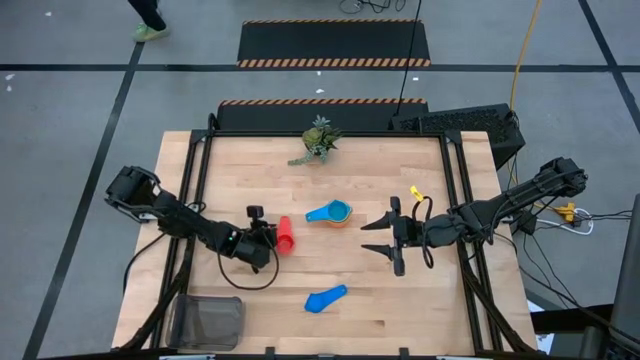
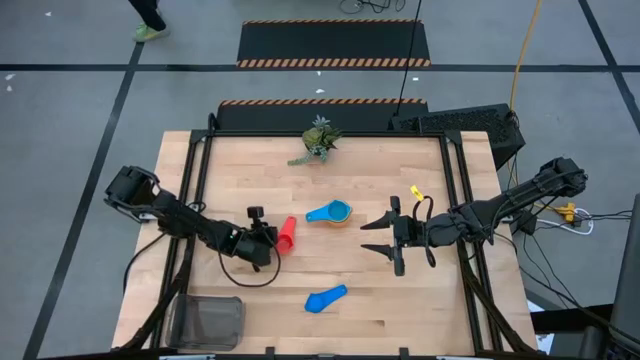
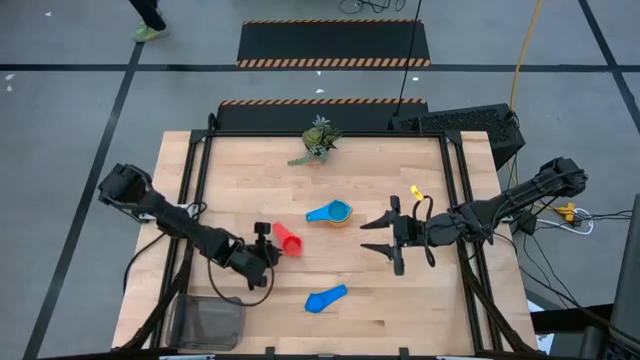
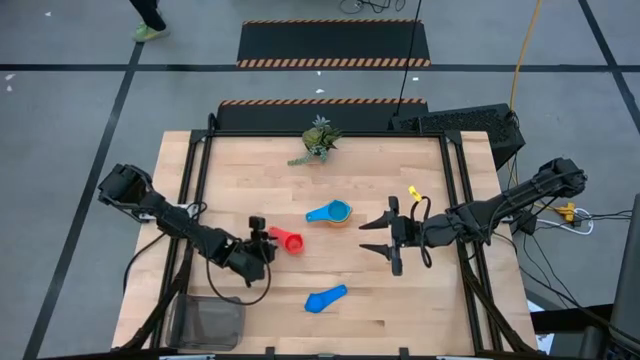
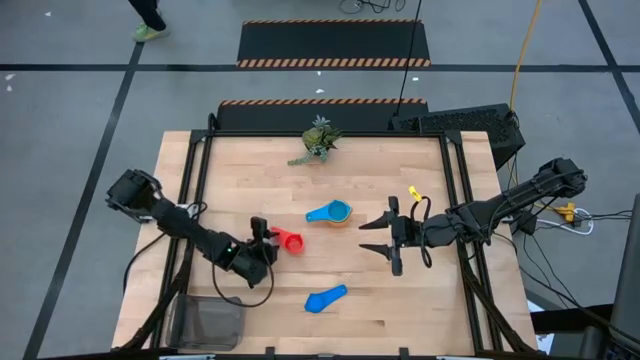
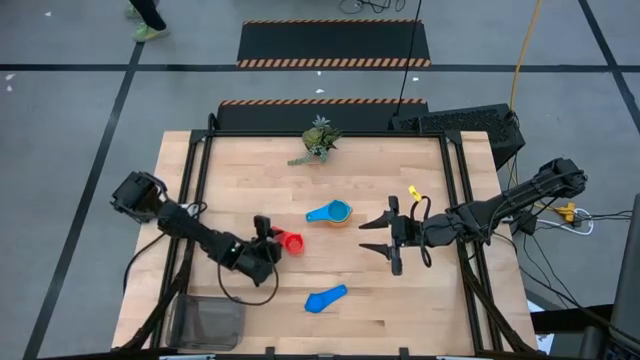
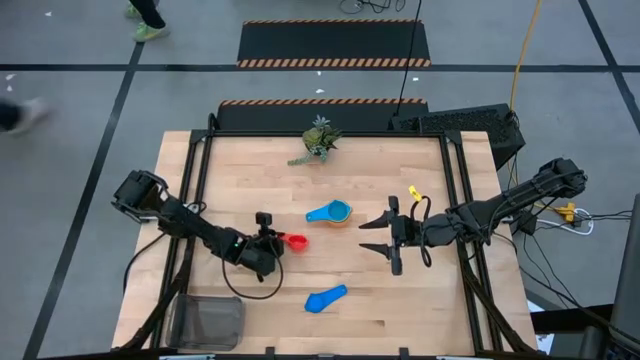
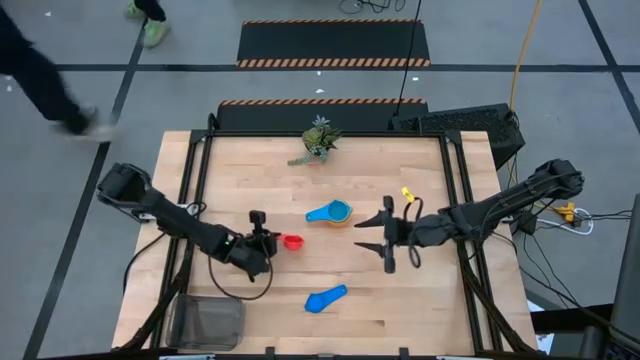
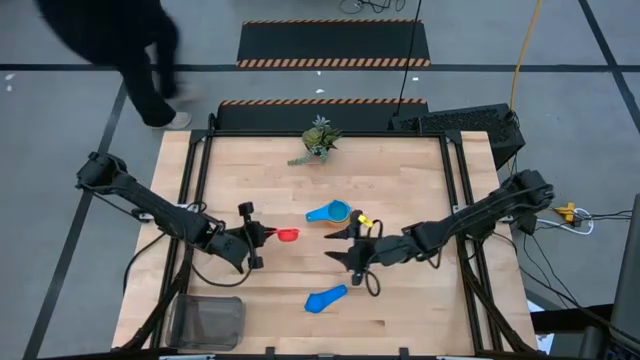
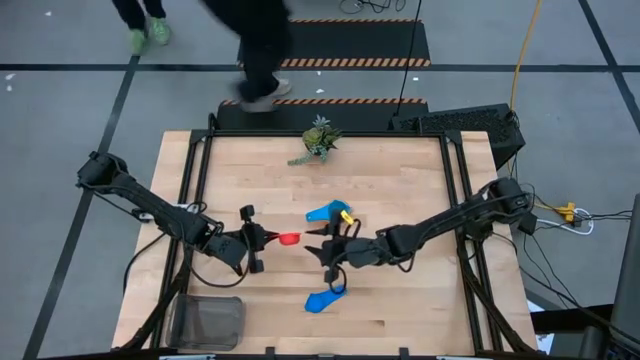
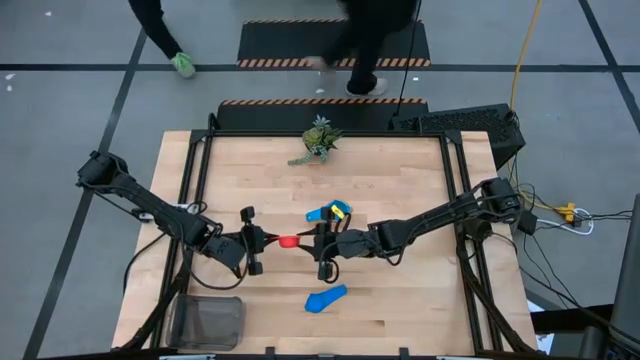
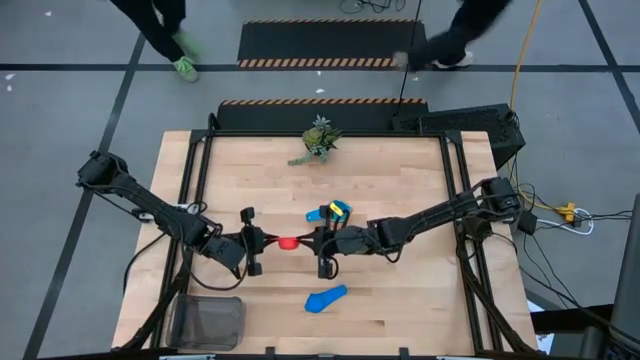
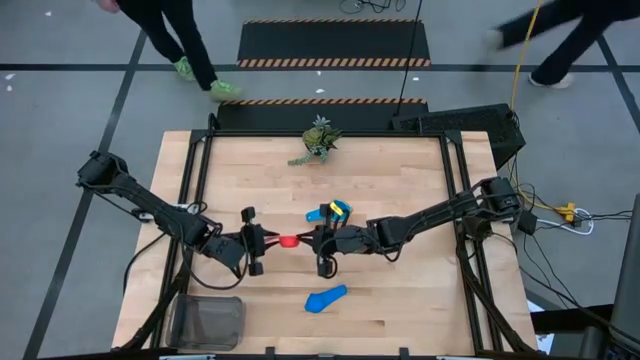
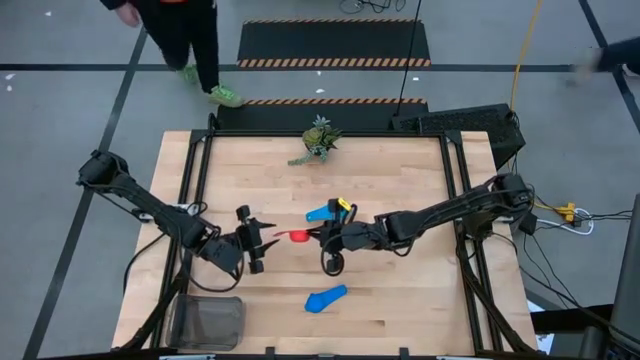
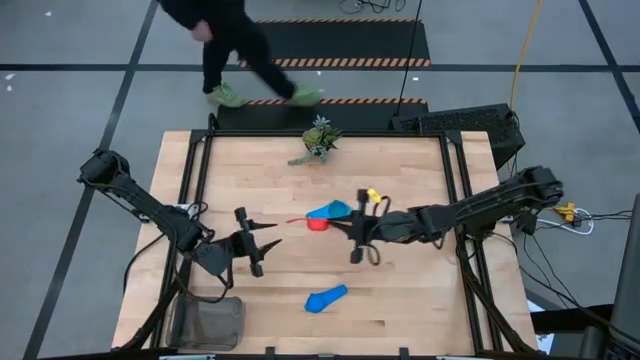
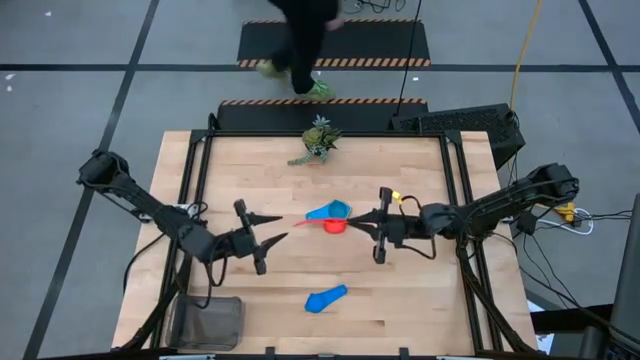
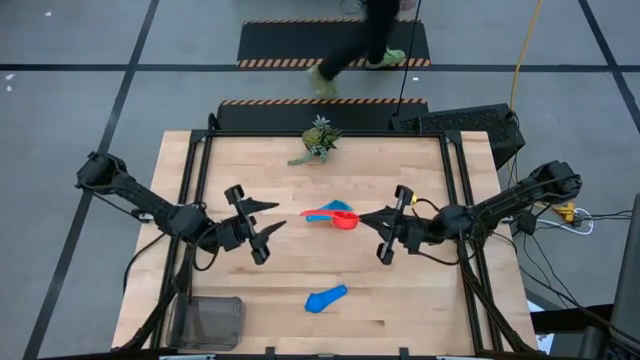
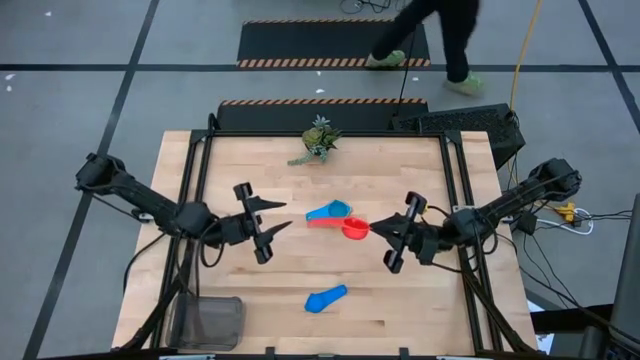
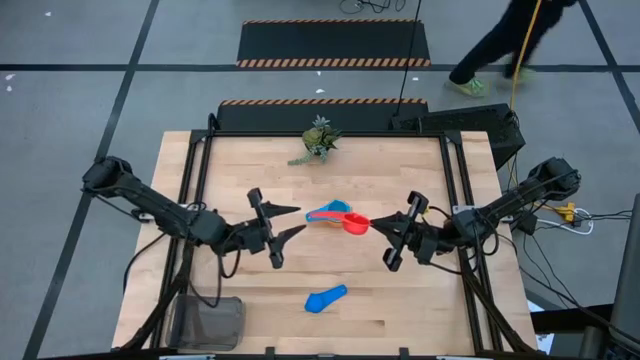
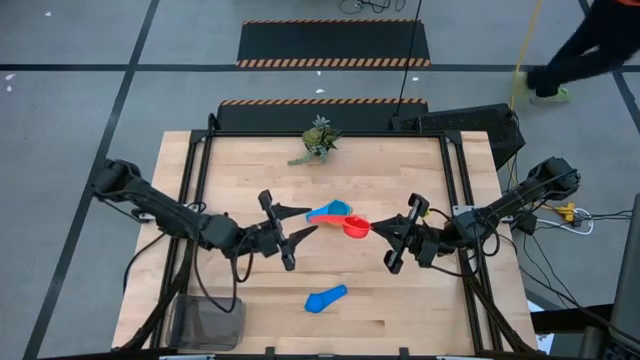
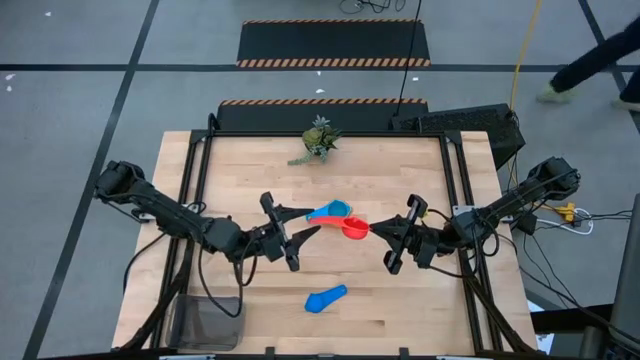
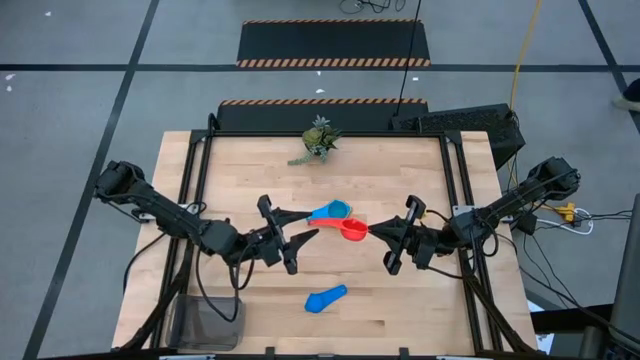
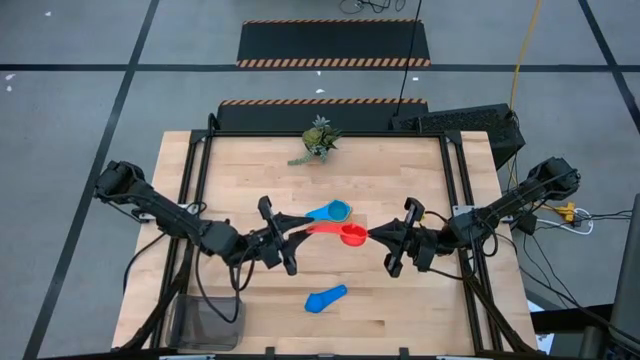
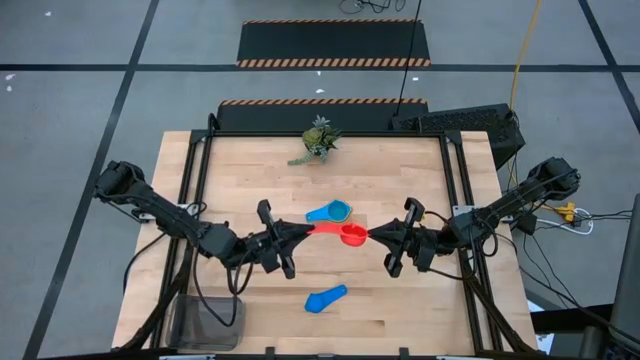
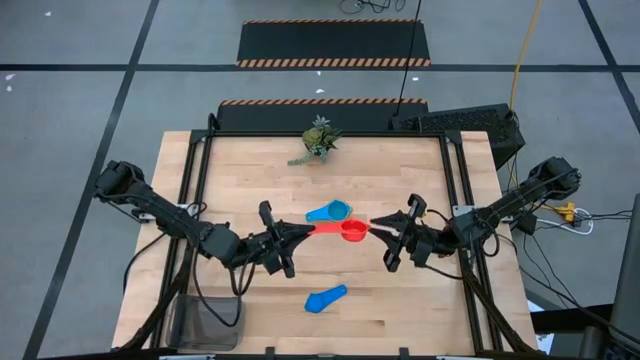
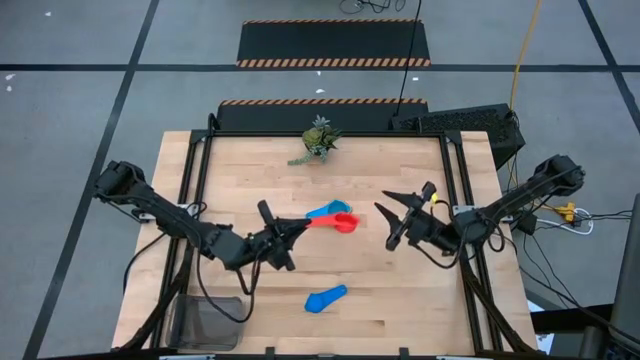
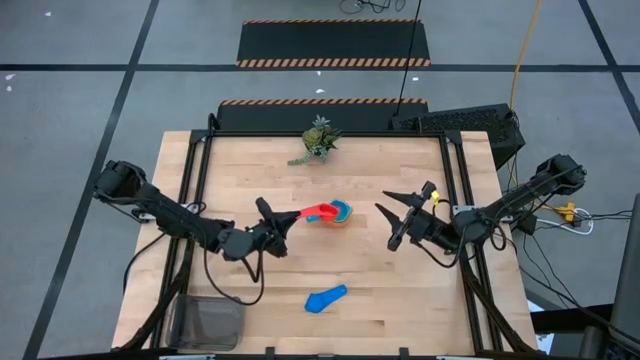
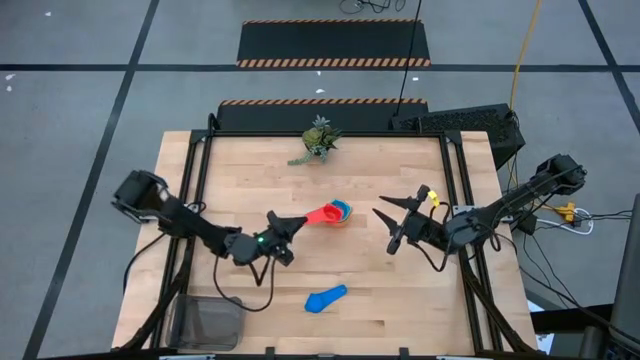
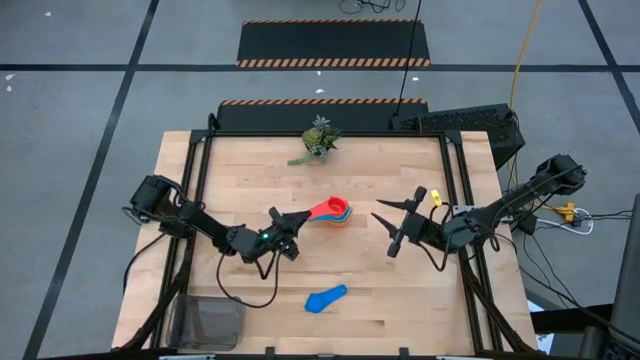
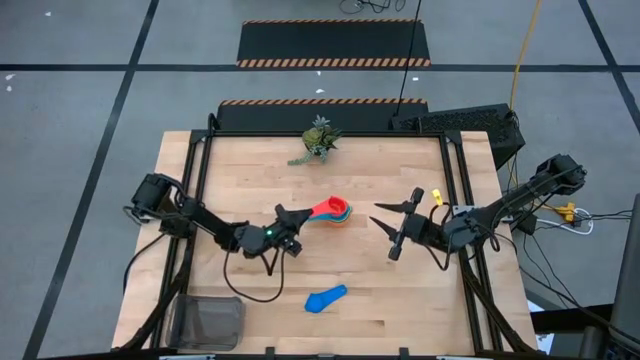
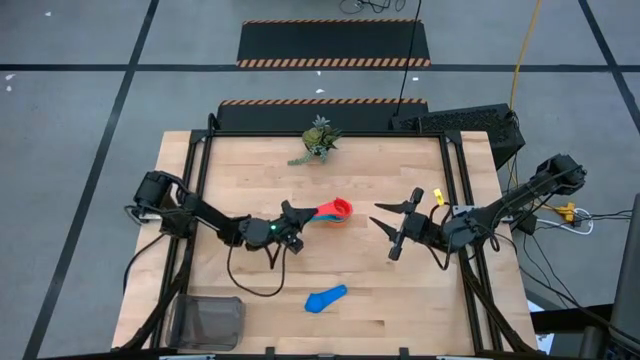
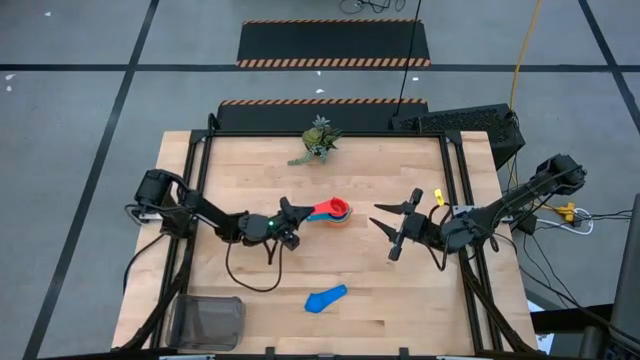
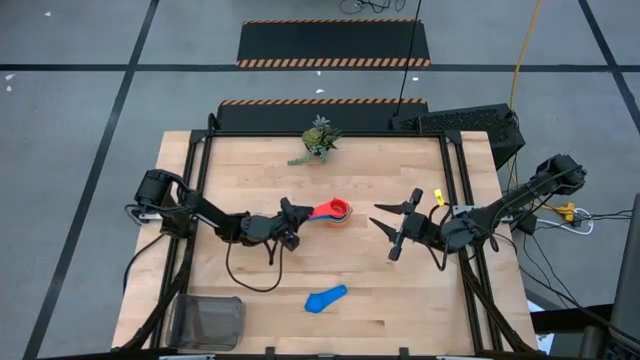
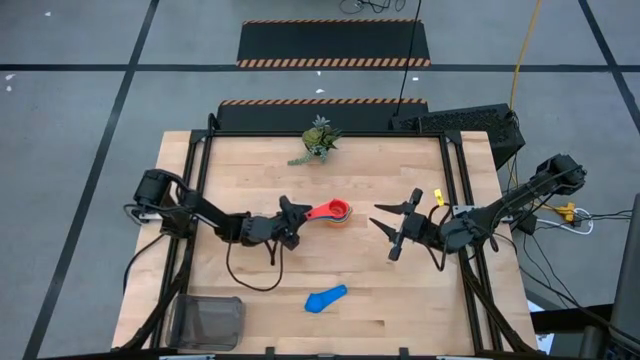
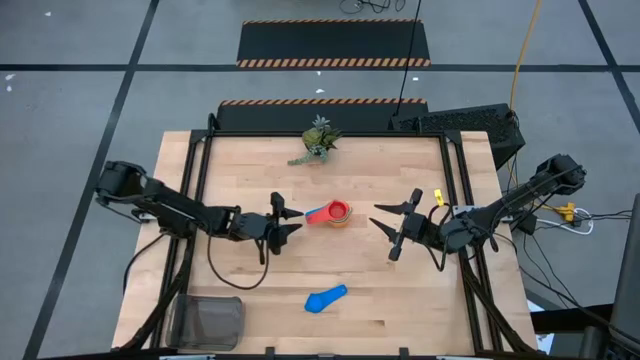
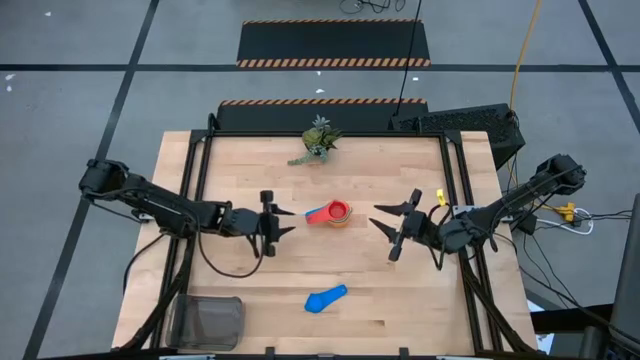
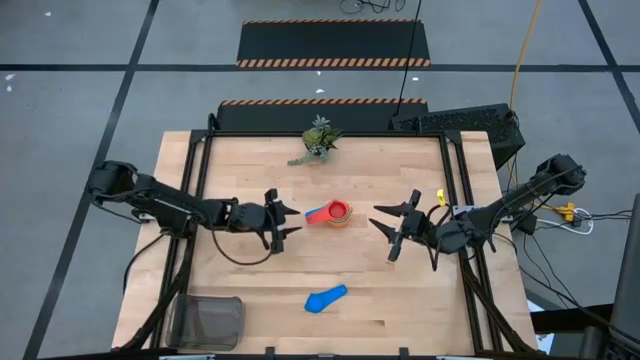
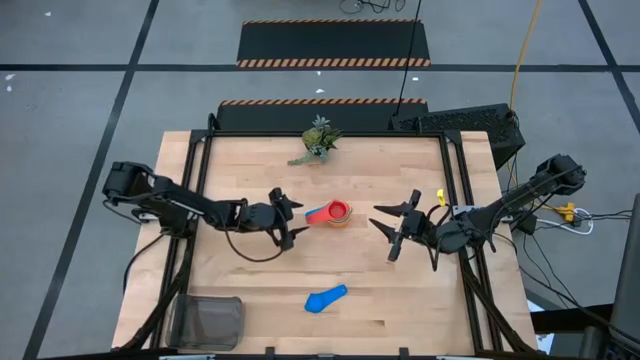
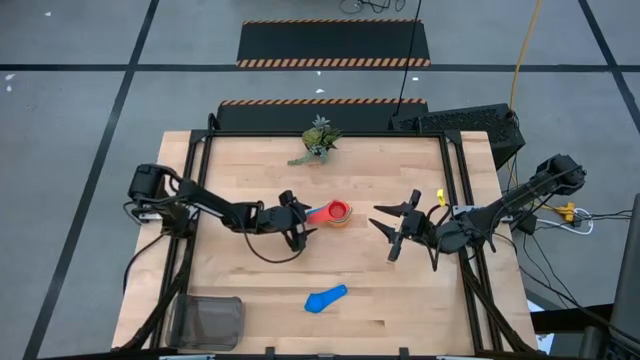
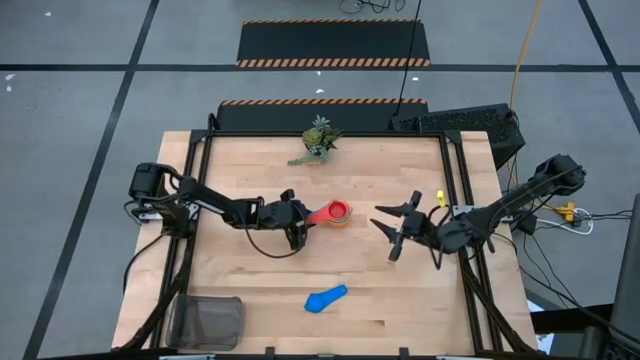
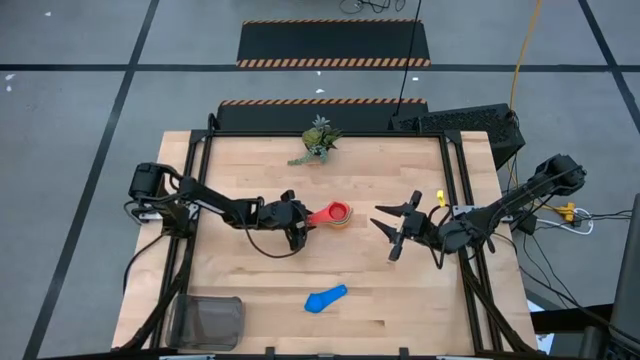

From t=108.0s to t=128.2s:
Task: Nest measuring cups in basket
Stack the red measuring cup on top of the light blue measuring cup
